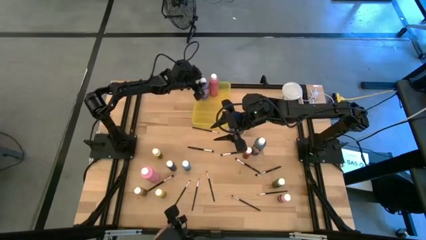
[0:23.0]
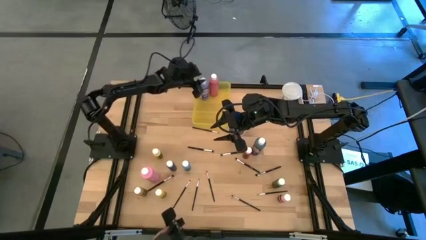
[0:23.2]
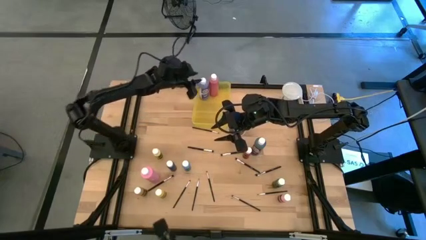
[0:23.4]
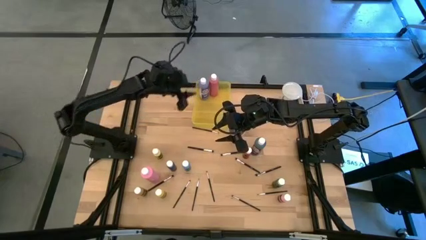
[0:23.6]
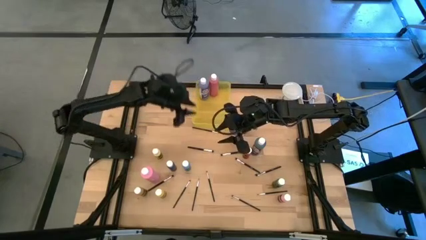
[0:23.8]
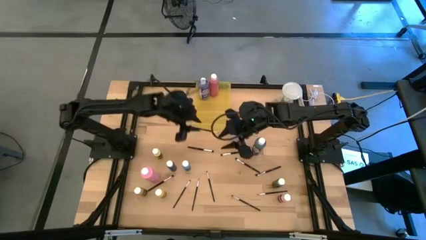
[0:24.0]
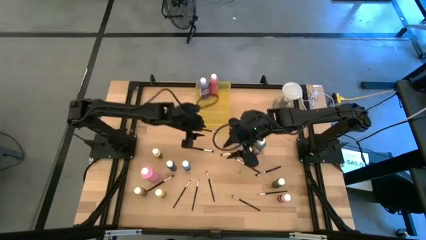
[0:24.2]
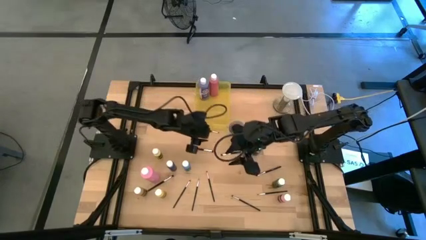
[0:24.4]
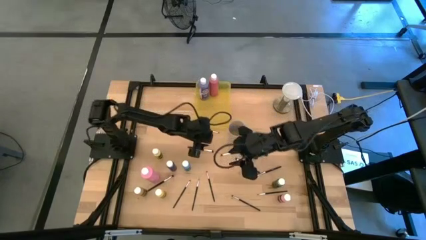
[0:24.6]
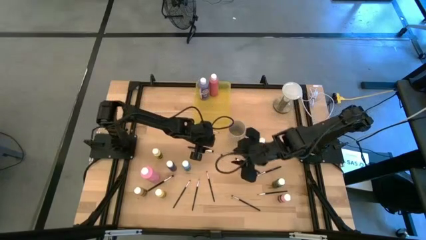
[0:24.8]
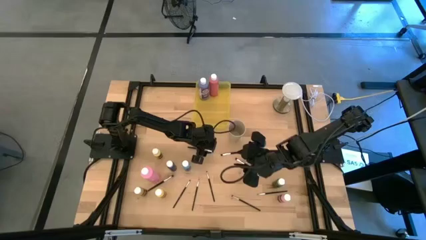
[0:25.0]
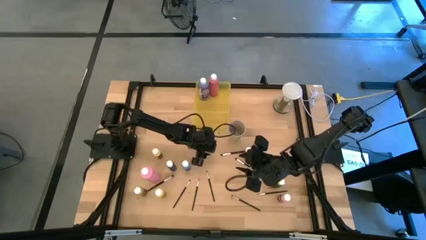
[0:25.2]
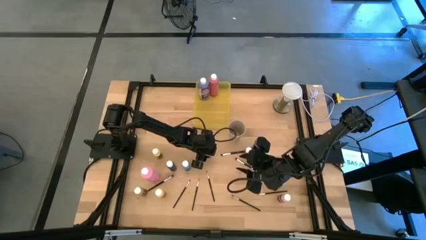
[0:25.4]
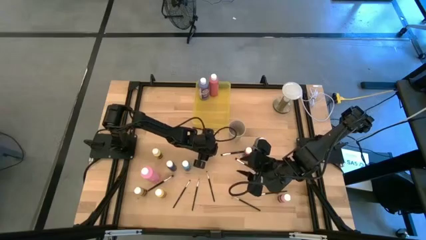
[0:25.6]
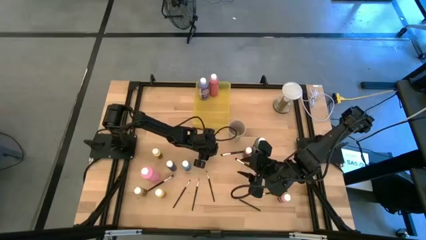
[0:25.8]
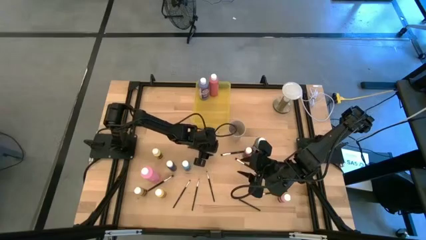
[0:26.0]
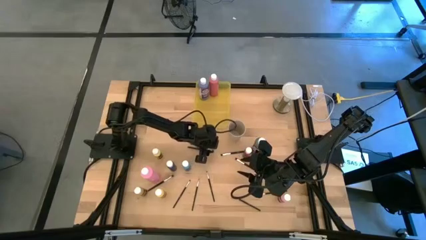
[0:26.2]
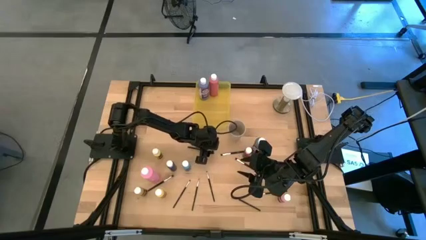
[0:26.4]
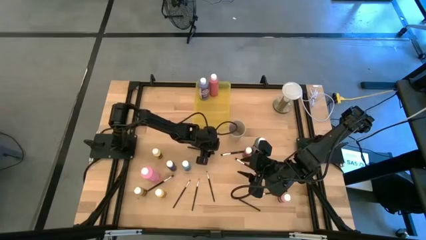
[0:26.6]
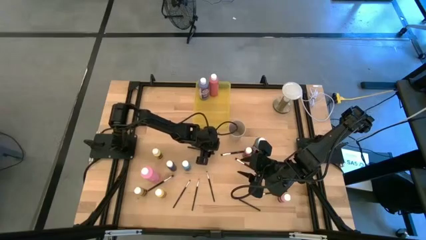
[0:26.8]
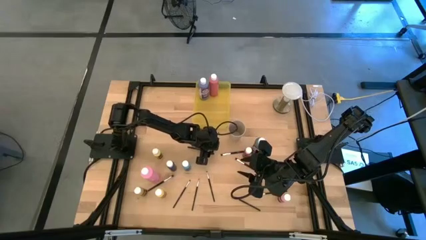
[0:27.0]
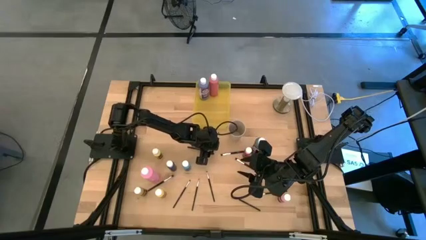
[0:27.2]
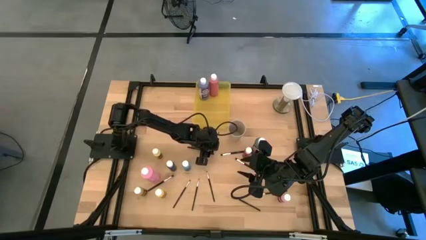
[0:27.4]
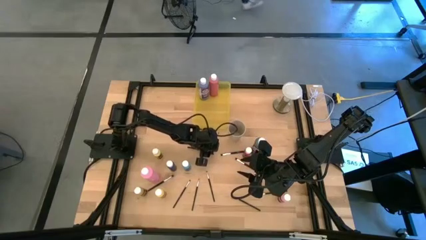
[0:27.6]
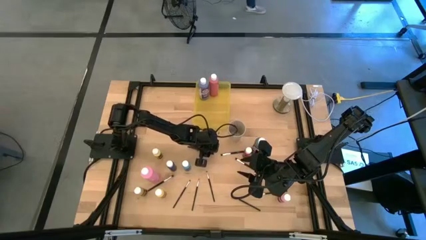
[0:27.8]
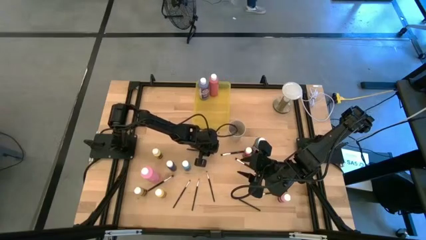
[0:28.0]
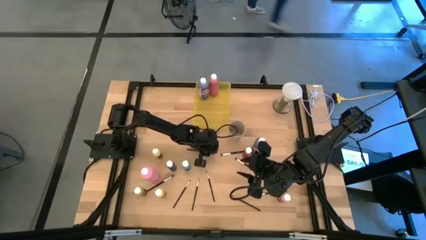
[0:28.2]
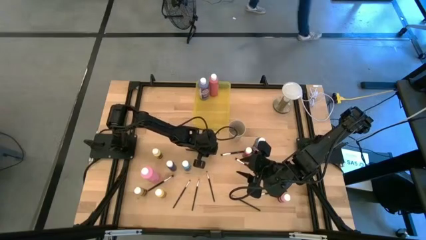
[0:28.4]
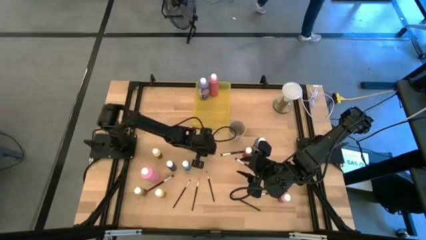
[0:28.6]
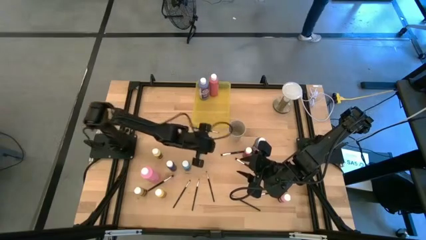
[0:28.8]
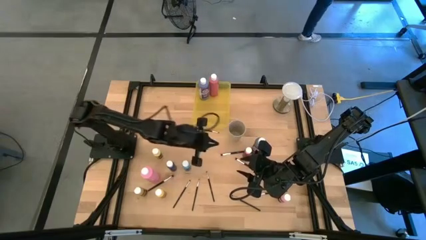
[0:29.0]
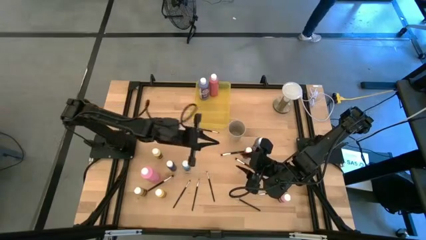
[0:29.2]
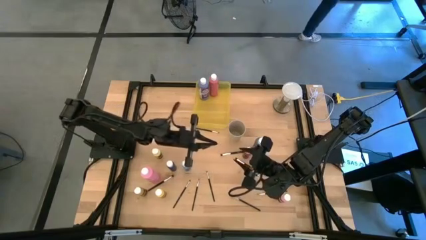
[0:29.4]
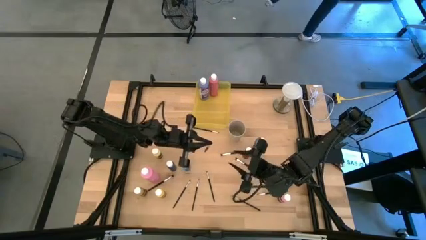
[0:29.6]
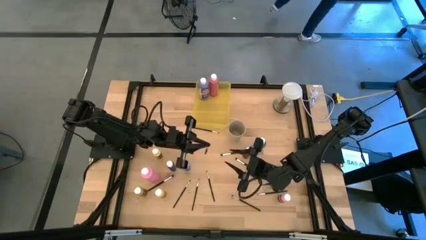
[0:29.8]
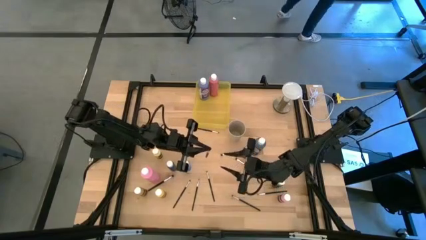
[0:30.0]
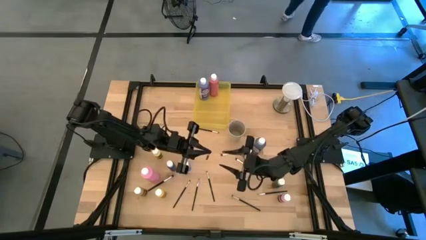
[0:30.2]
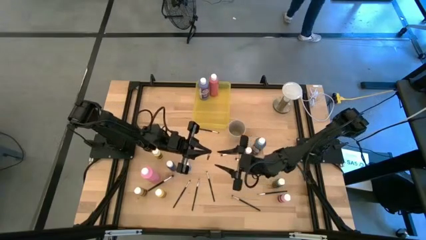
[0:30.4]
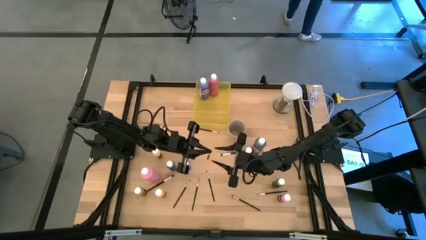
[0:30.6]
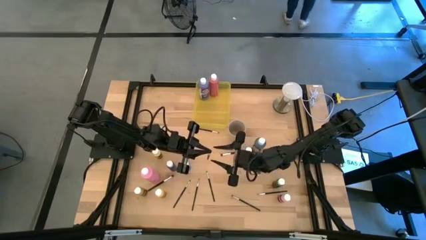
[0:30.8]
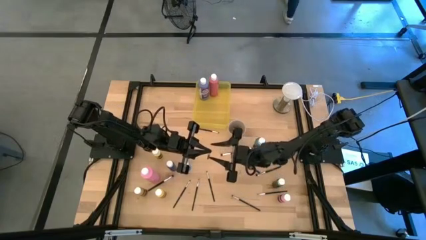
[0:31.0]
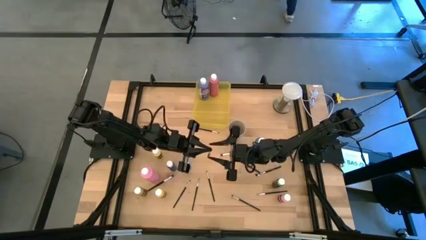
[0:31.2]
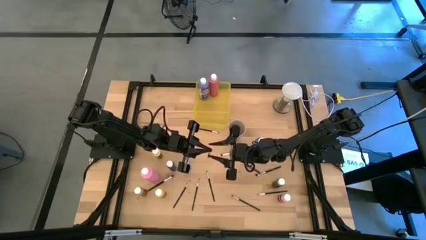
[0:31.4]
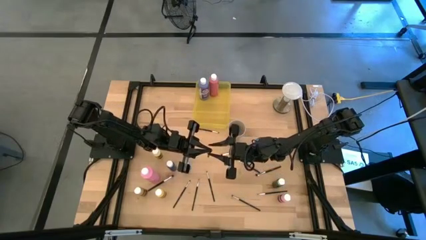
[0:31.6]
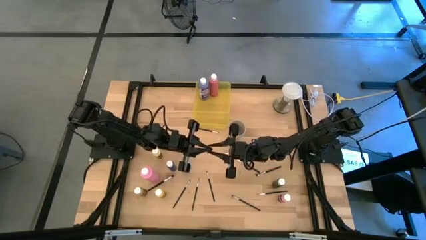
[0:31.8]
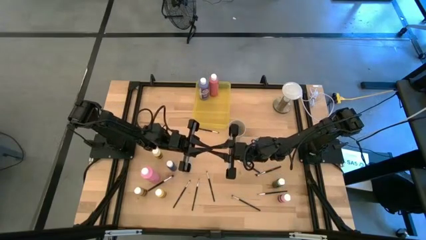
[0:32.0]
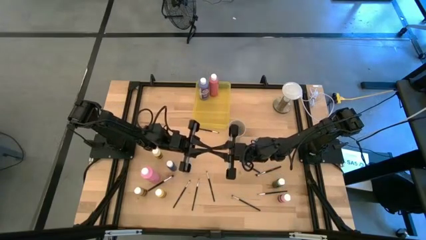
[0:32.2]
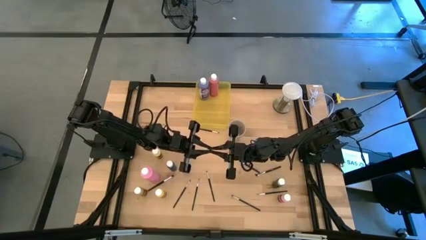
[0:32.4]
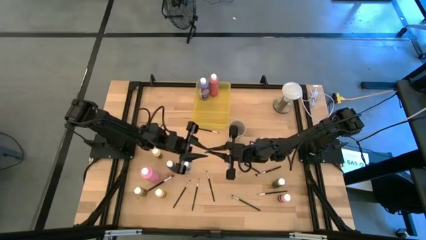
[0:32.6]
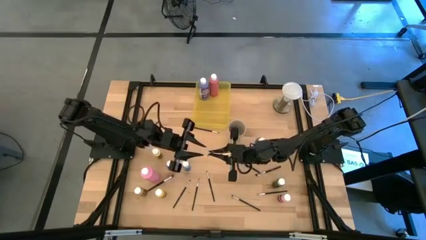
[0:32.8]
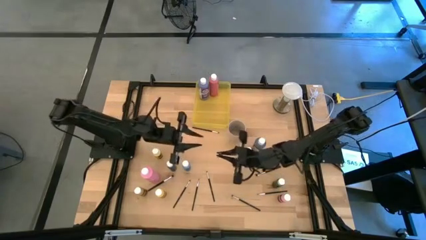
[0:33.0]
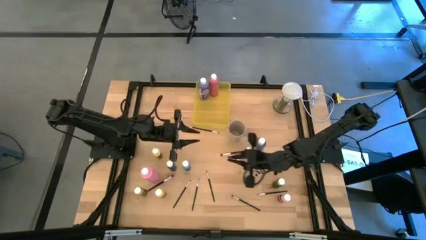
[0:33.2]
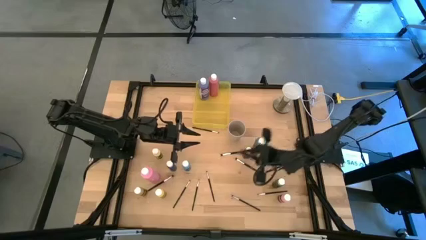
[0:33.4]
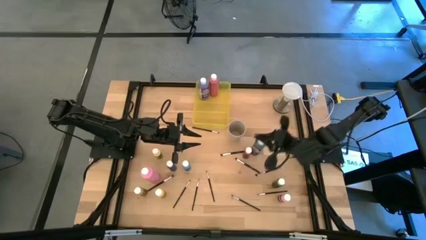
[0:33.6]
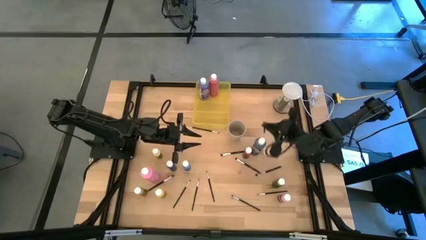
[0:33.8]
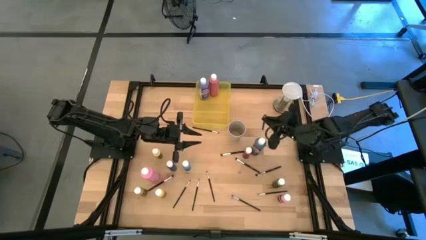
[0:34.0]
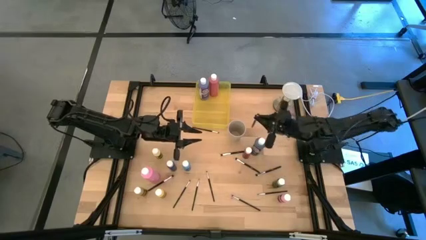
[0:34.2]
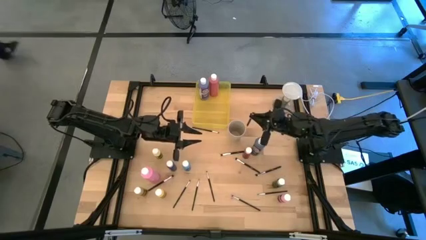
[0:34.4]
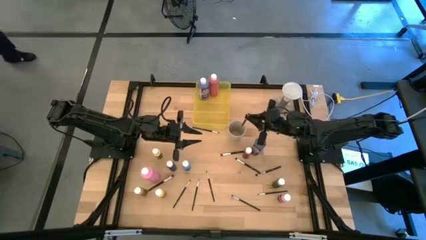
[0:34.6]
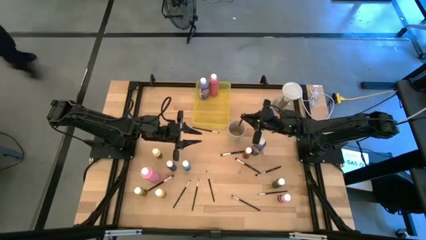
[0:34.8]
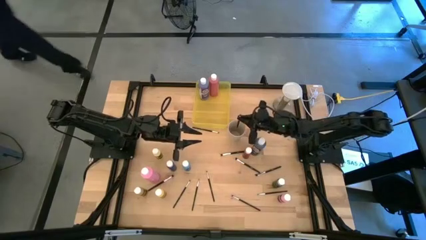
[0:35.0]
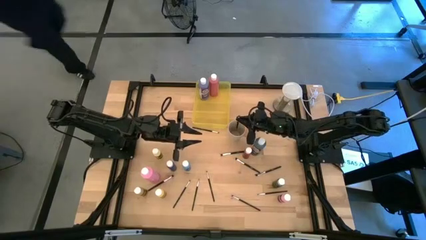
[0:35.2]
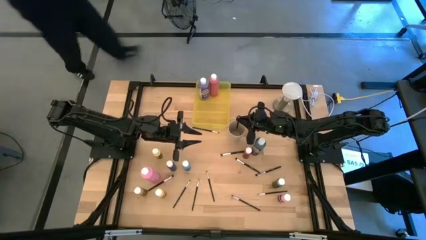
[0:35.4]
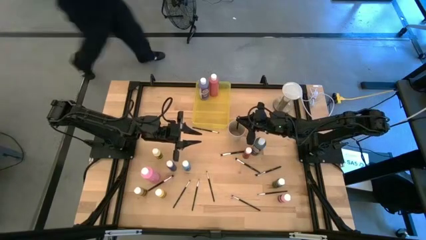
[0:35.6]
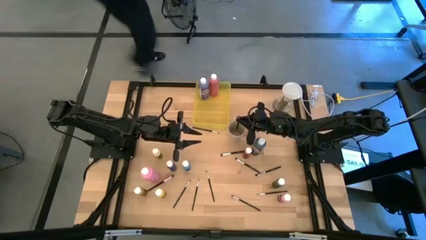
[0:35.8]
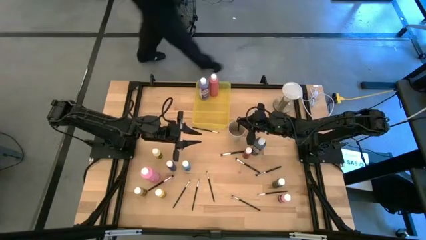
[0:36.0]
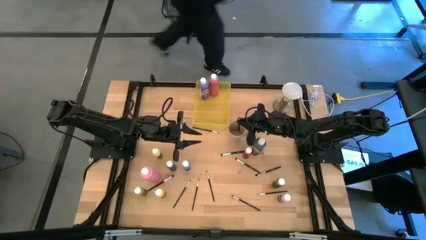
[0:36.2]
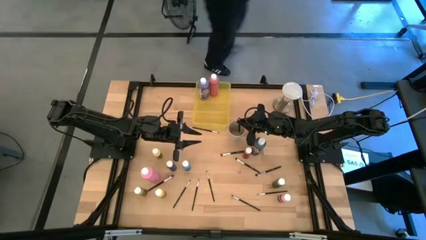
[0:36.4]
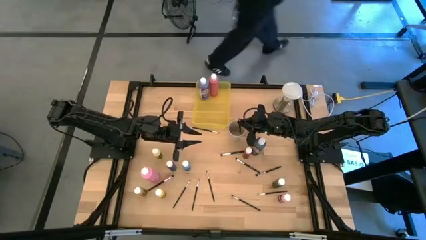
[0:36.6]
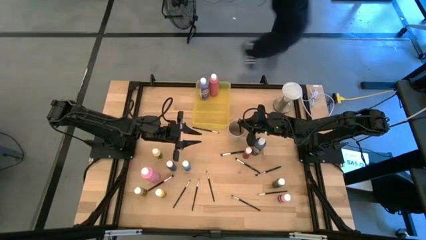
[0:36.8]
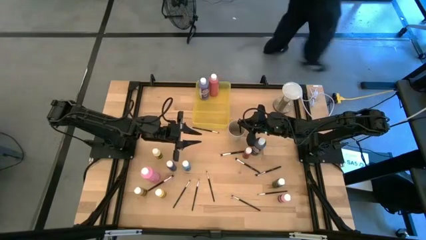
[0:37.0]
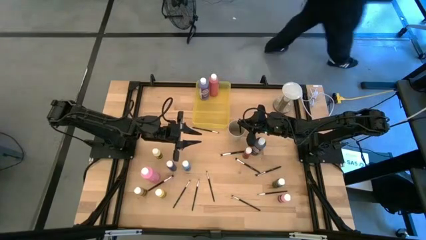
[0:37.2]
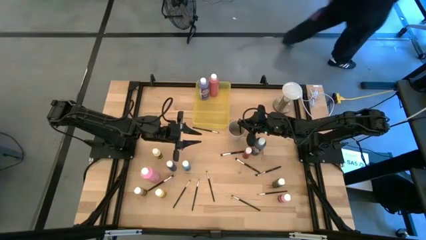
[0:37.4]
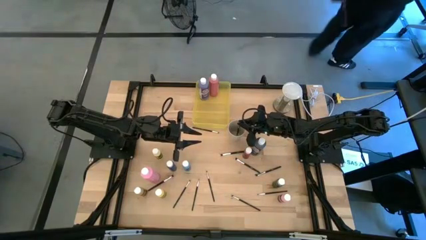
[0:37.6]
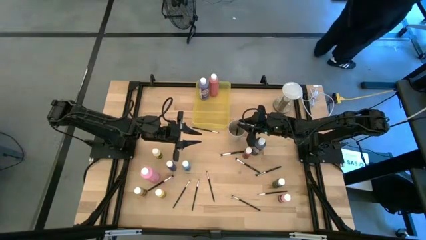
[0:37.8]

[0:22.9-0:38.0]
Task: Pick & Place Paint Supplies
Put the black paintbrush into the white cup

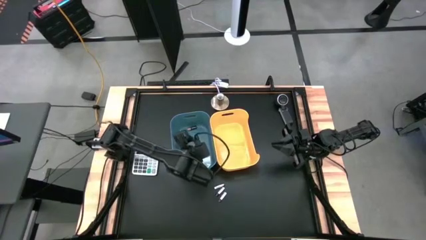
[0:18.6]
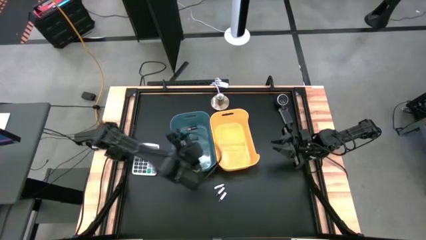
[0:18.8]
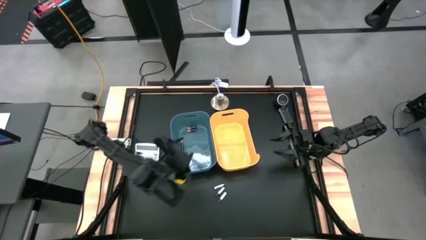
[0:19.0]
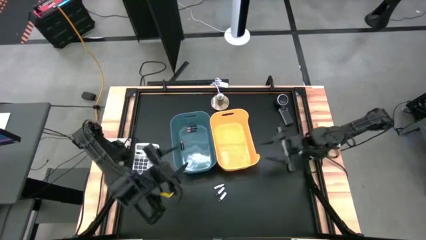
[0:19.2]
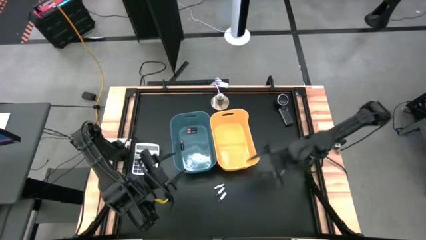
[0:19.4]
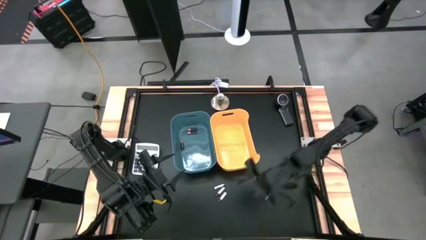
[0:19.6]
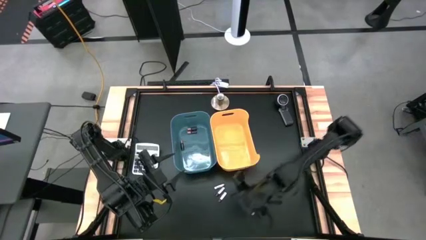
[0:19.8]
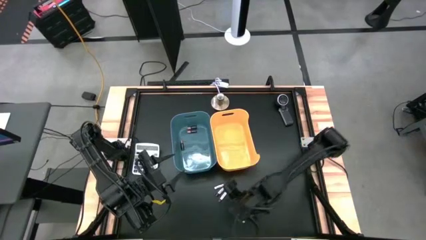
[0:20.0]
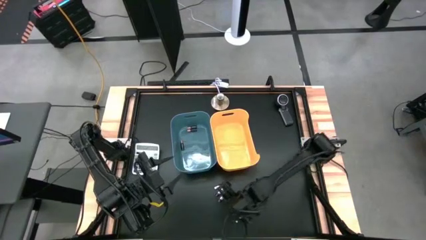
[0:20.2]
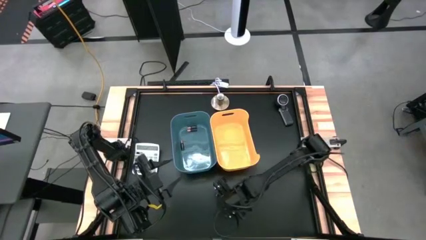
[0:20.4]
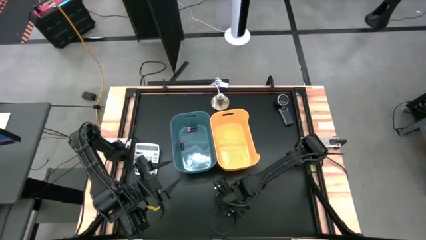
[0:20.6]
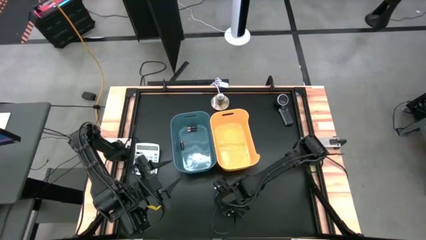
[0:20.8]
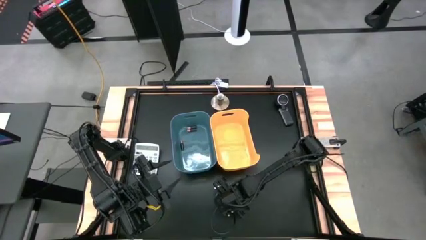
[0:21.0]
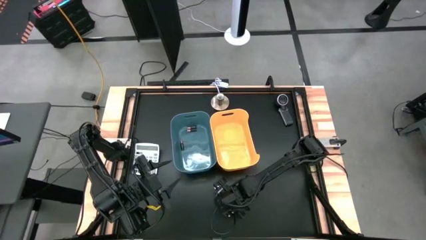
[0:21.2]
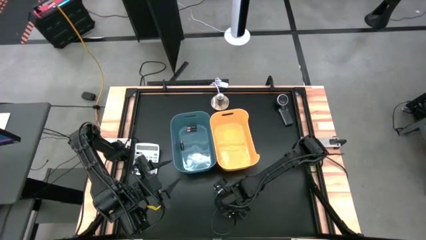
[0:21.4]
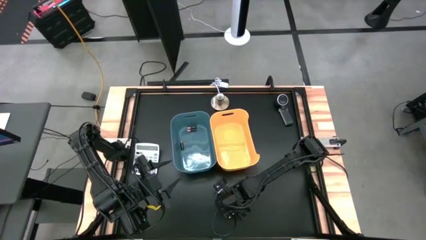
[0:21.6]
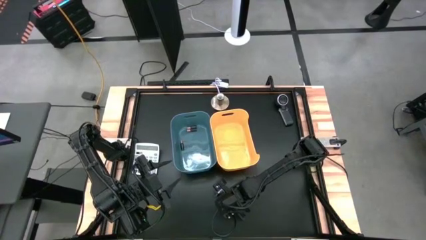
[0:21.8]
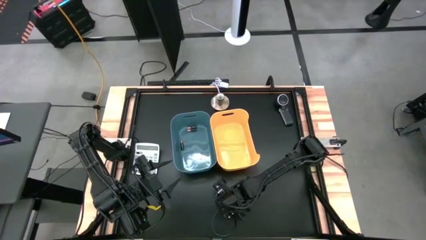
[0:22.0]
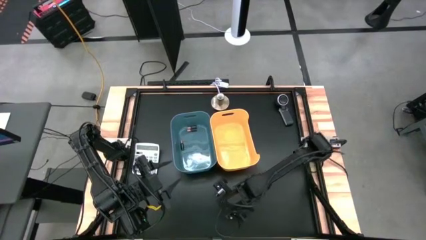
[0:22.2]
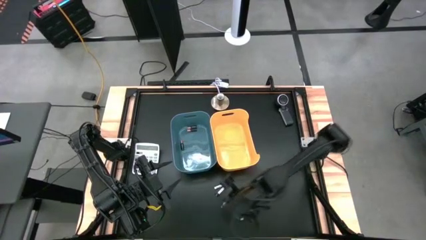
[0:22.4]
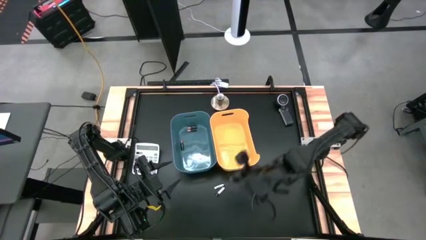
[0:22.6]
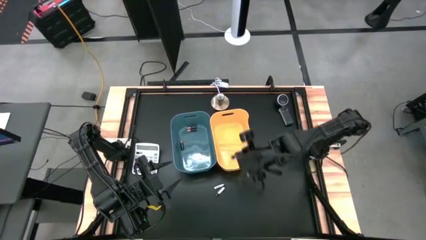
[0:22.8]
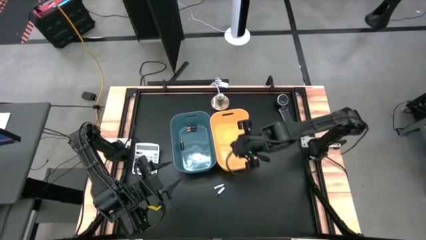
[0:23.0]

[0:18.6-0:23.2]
Task: Sort batteries
Put the bottom silver battery into the yellow bin
